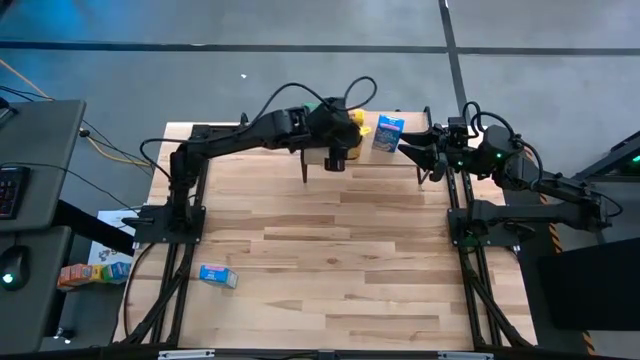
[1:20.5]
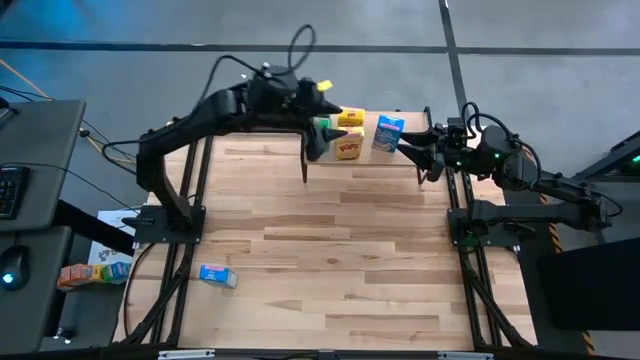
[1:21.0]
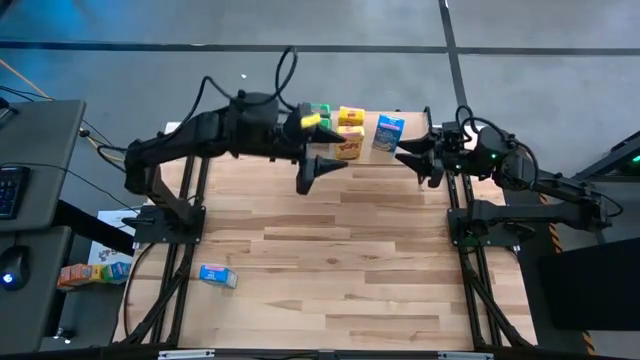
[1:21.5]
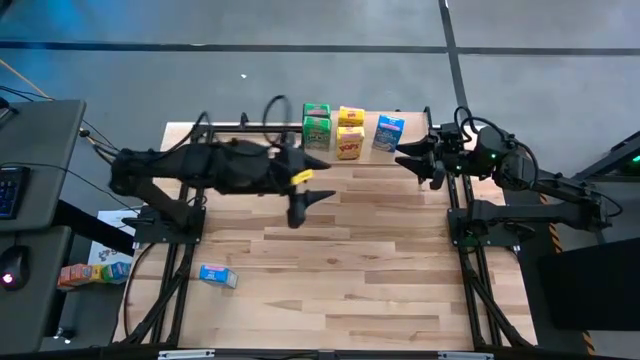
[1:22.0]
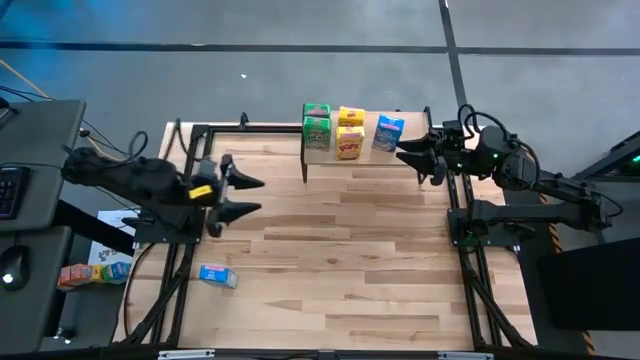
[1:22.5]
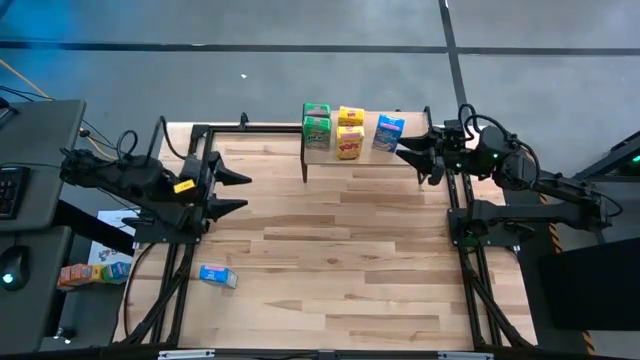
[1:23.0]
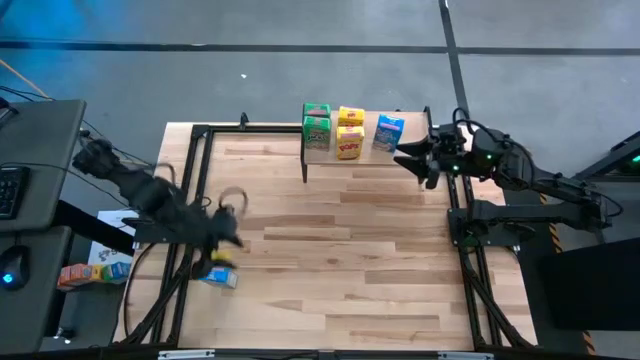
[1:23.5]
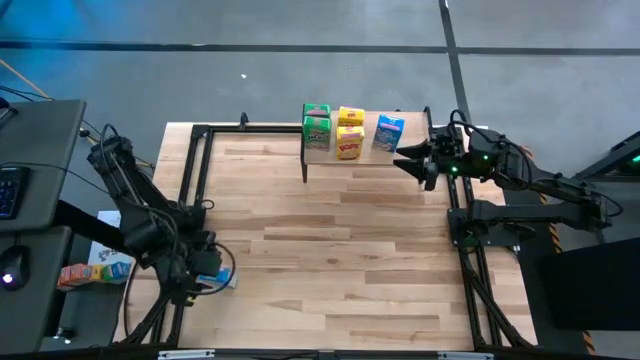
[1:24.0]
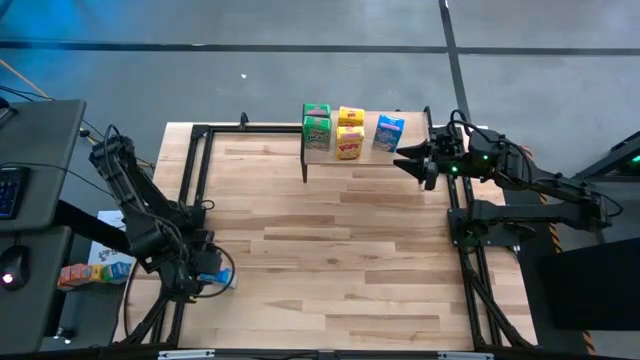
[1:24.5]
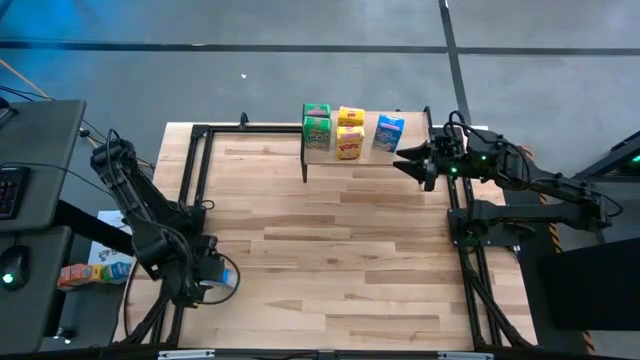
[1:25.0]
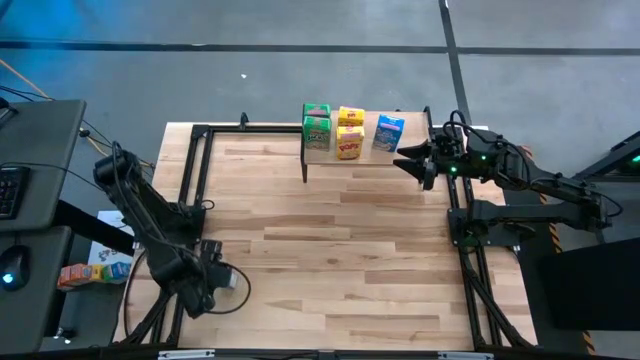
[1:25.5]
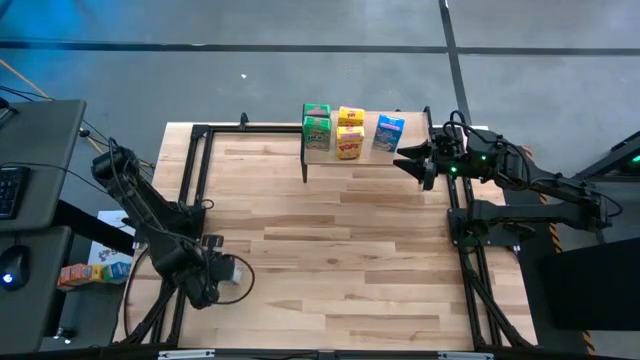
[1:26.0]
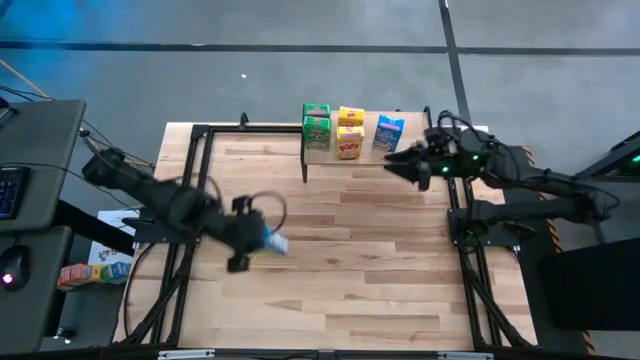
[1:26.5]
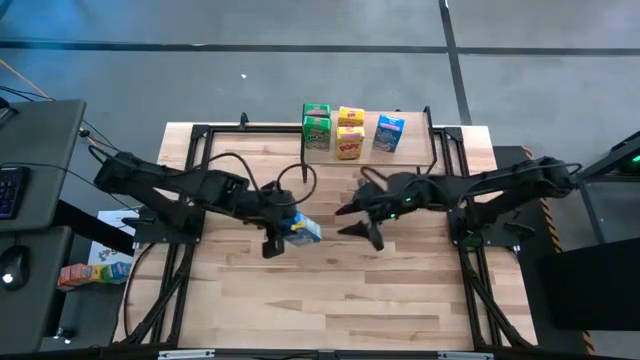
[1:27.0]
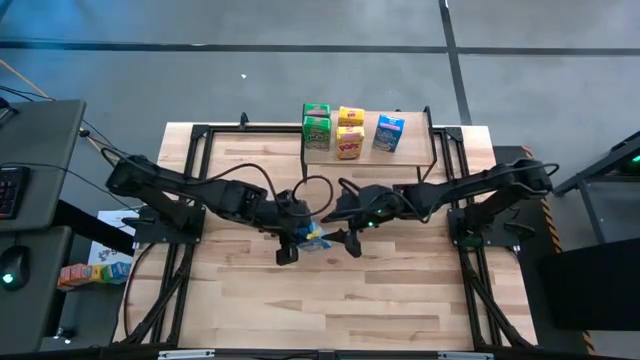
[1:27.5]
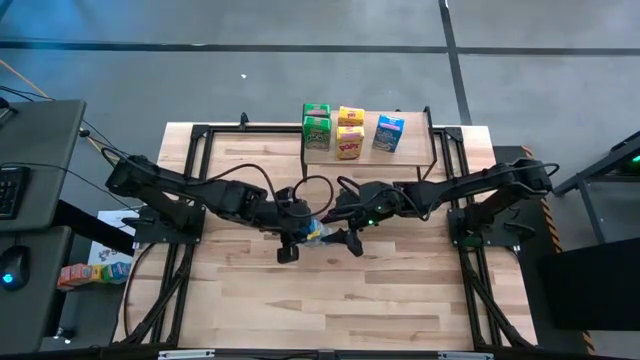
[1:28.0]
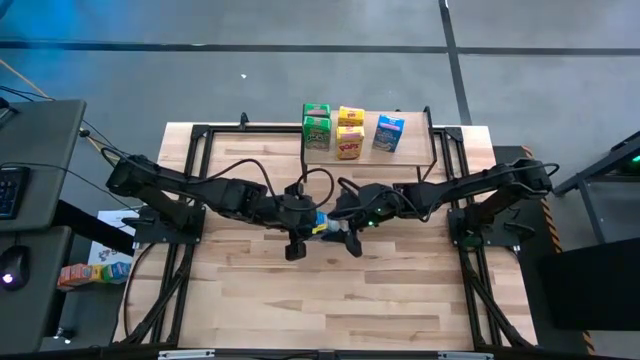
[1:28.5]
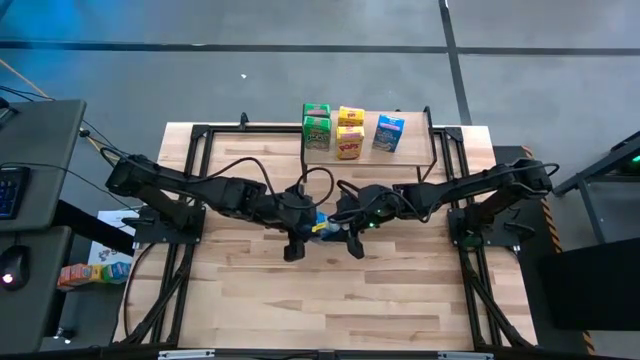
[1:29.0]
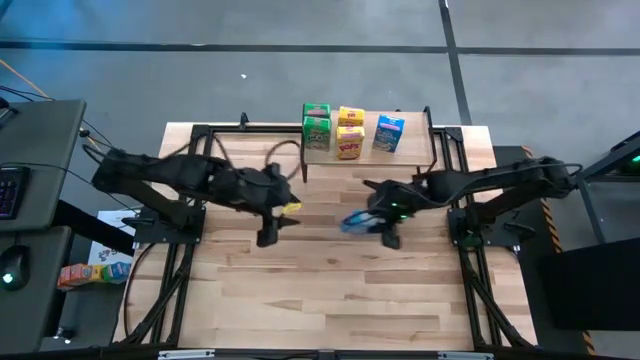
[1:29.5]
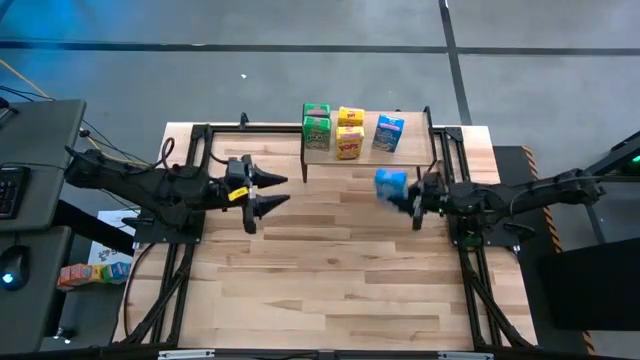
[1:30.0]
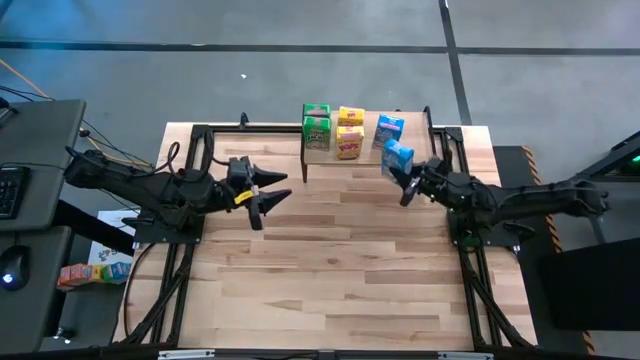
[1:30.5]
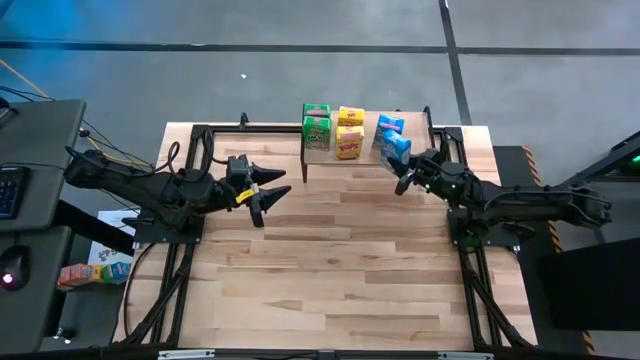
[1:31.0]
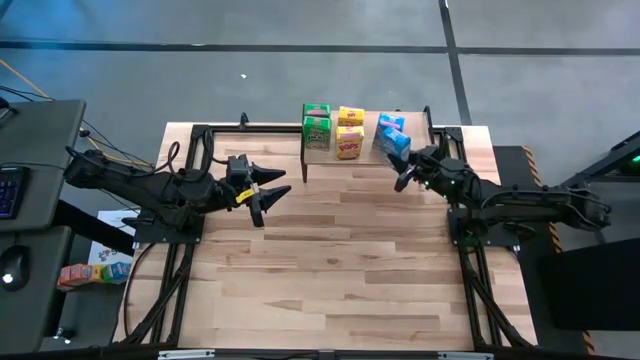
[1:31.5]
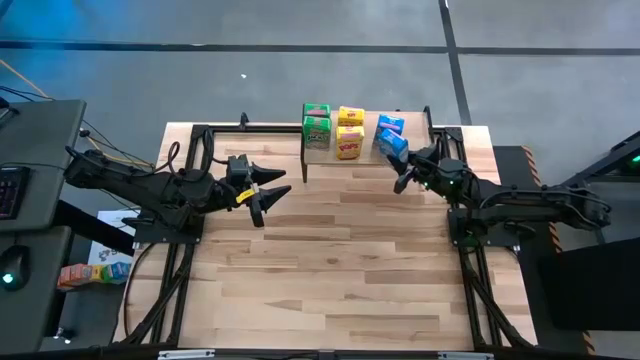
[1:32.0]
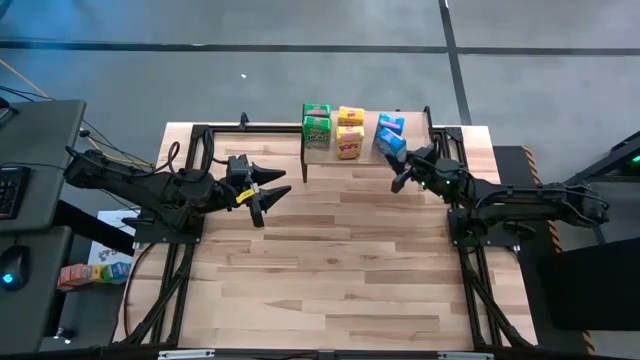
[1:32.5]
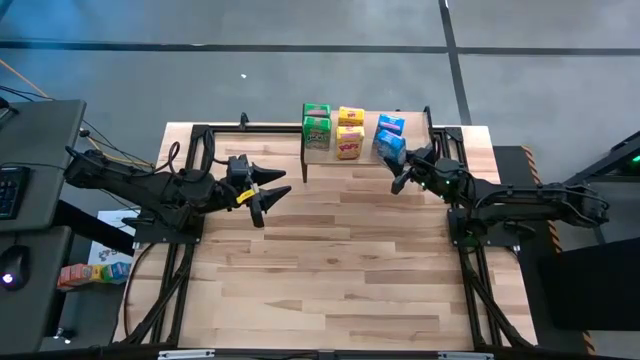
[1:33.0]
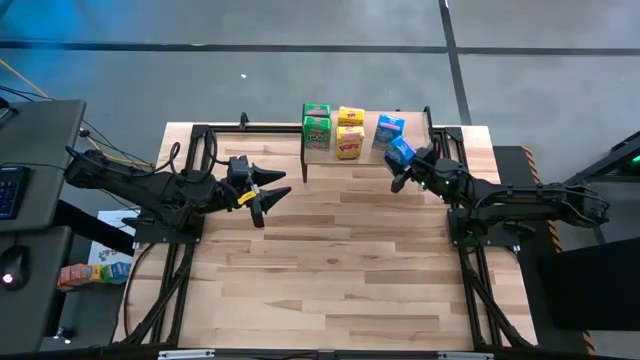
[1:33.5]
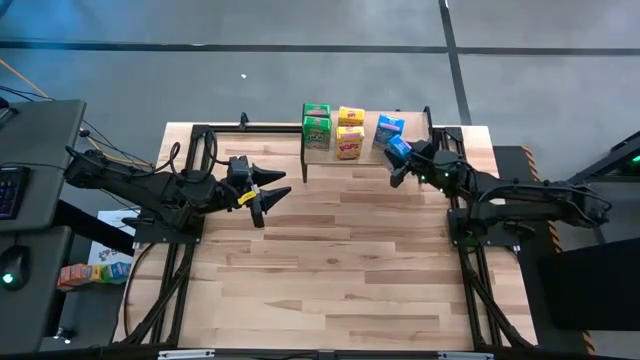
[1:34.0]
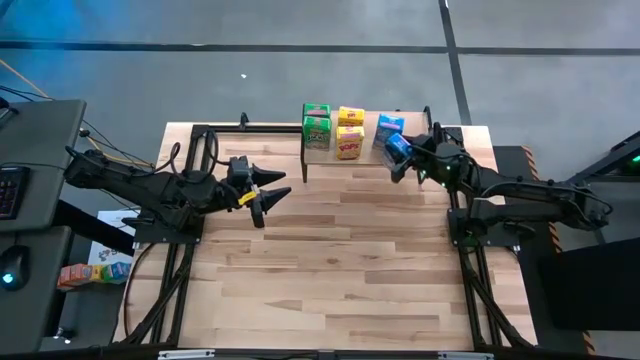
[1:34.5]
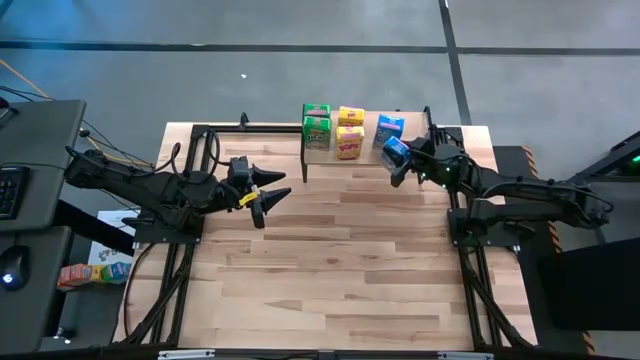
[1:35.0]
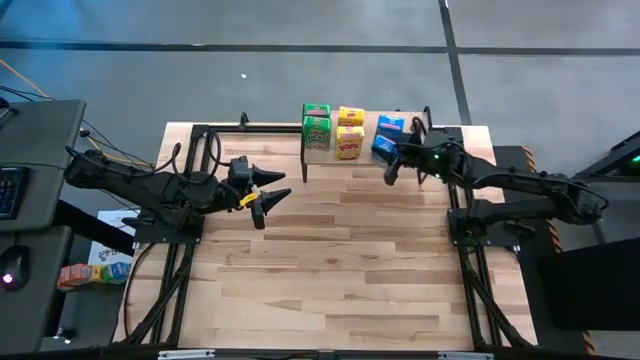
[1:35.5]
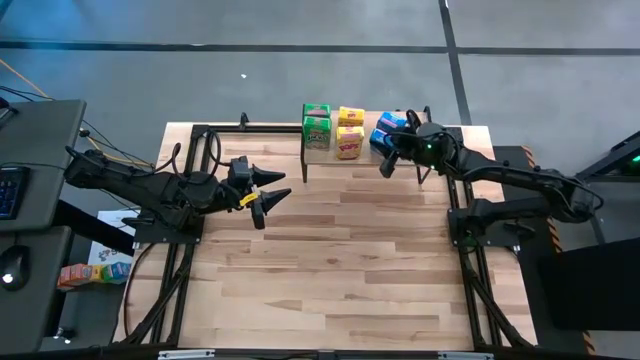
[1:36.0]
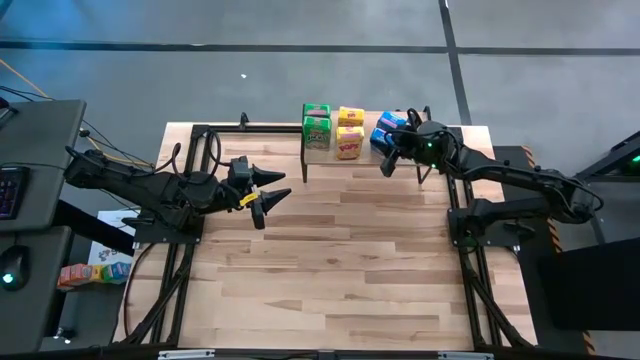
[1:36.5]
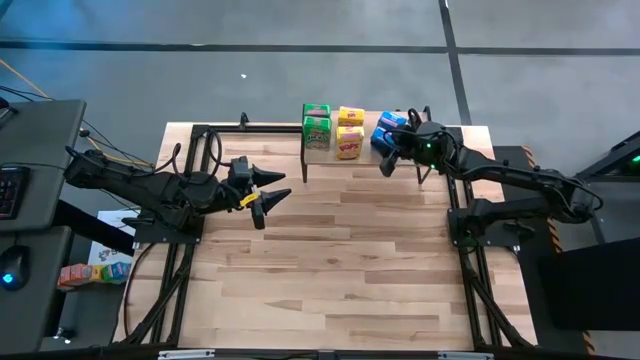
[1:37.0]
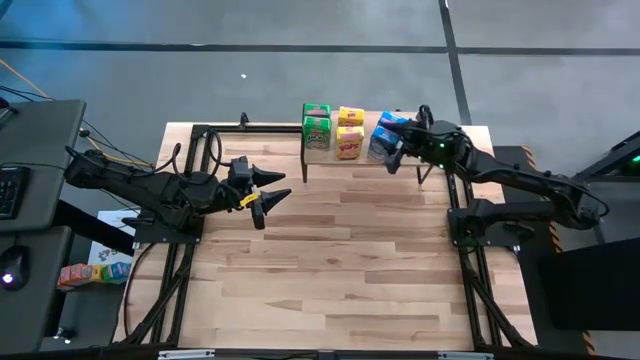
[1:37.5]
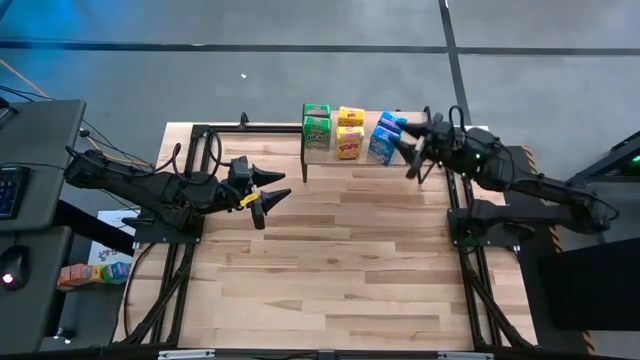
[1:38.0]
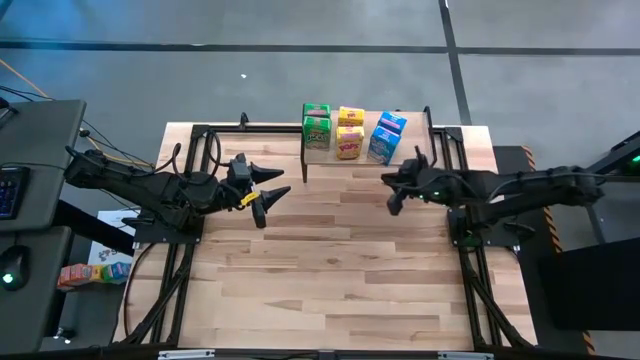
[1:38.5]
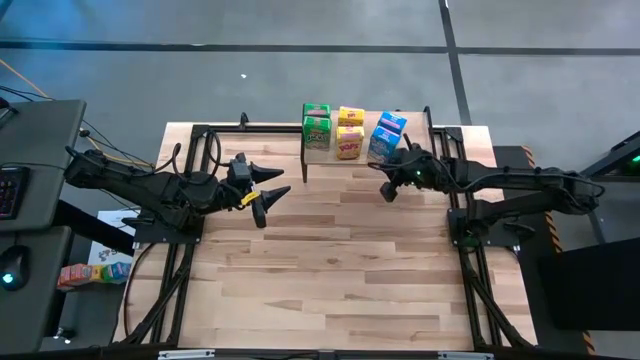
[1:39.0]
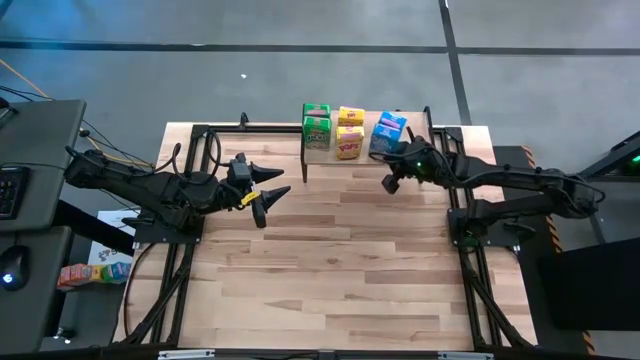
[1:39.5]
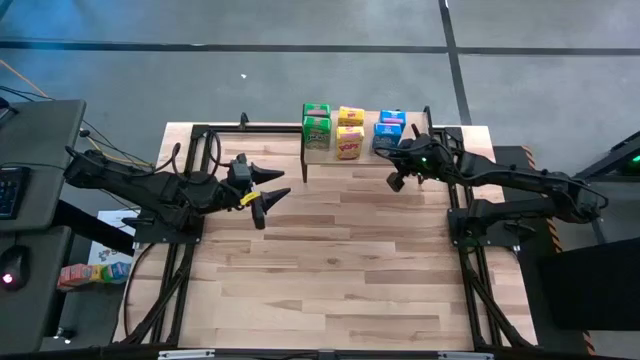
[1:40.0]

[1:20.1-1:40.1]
Task: Stack cereal on shelf
Put the blue cereal box on the shelf

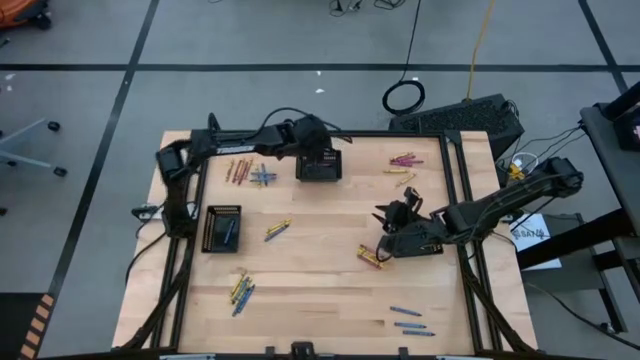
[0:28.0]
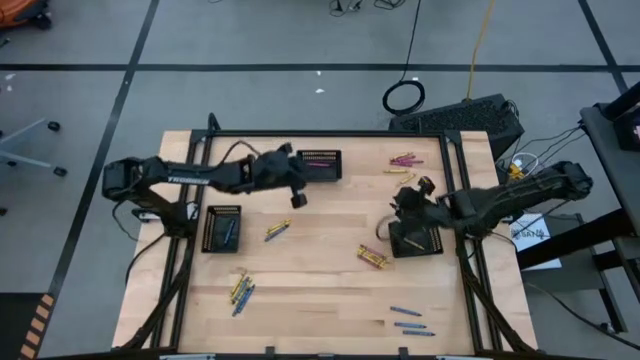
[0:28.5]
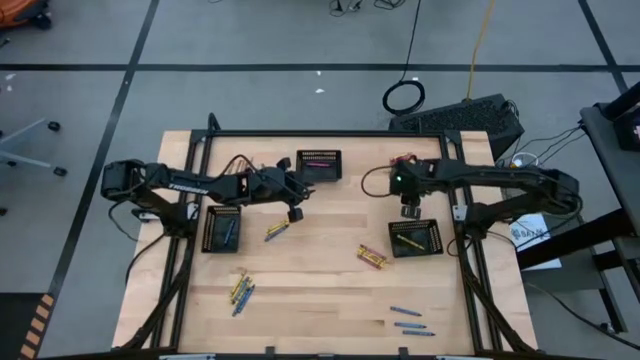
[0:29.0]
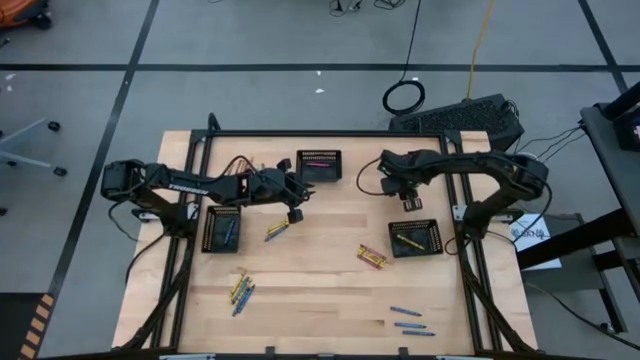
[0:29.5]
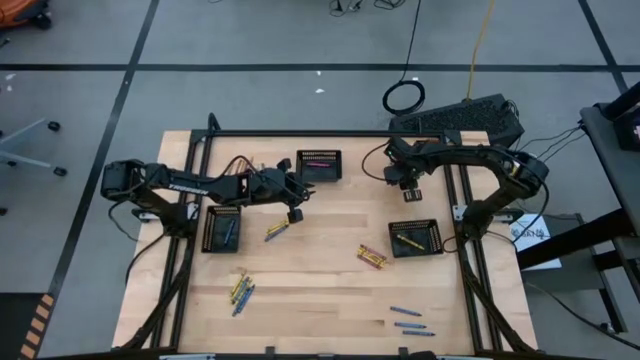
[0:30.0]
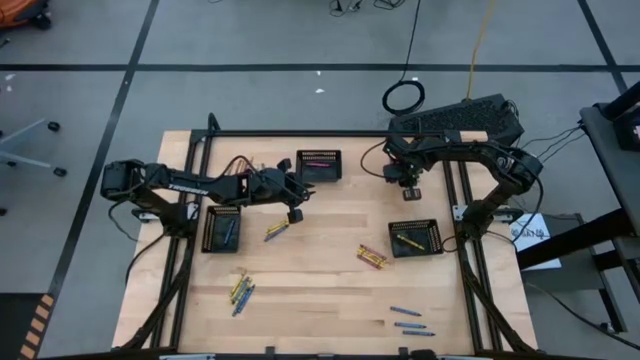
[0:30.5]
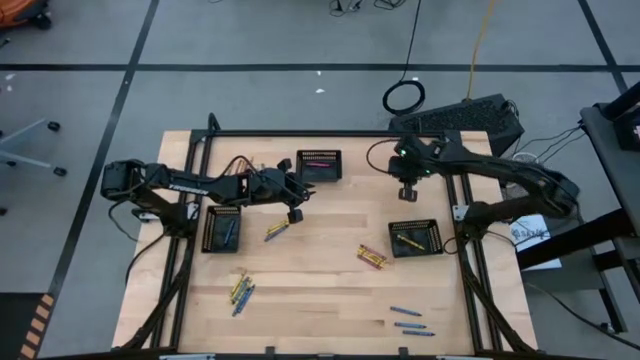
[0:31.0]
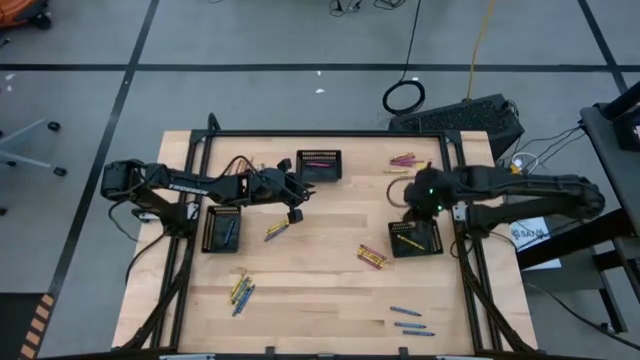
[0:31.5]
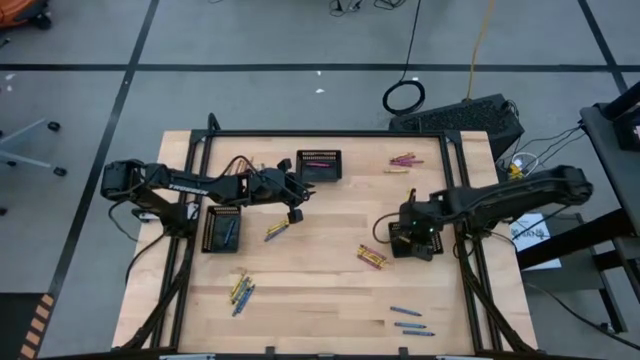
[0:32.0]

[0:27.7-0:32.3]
Task: Sort crayons
Put the yellow crayon into the bottom right black bin
